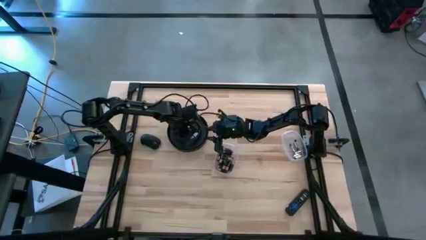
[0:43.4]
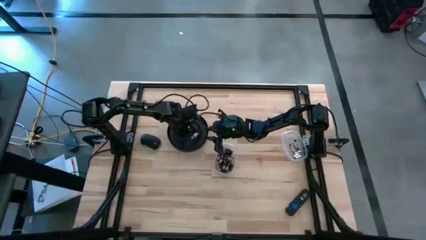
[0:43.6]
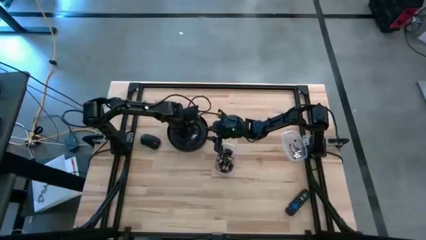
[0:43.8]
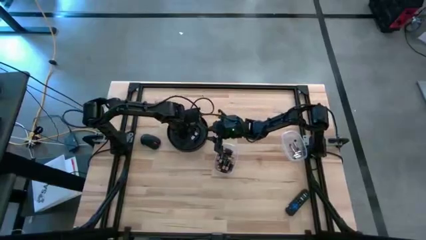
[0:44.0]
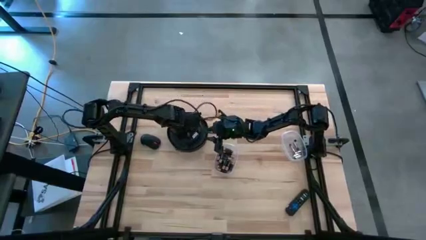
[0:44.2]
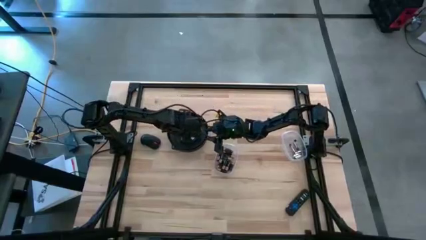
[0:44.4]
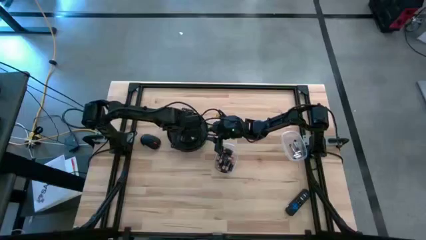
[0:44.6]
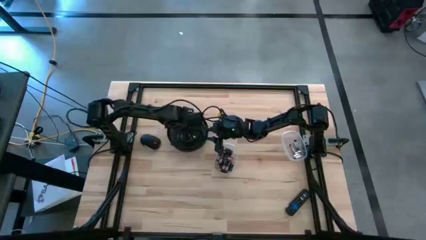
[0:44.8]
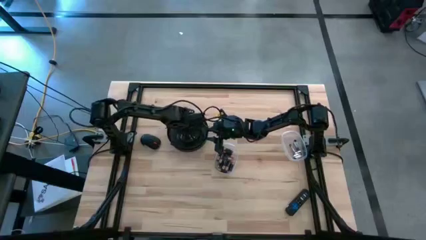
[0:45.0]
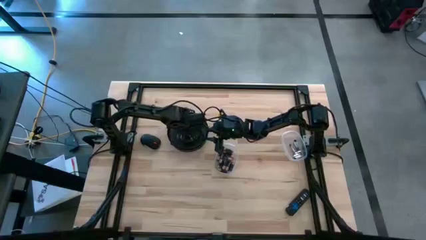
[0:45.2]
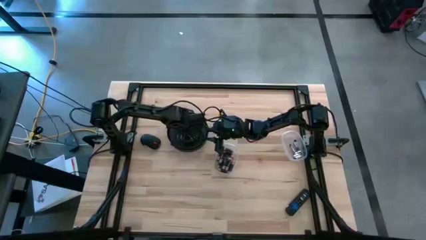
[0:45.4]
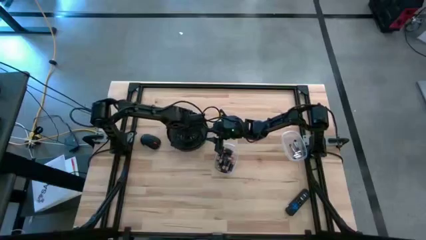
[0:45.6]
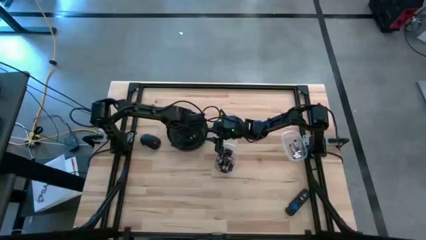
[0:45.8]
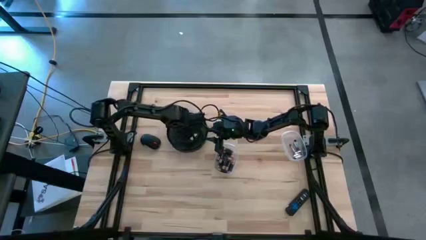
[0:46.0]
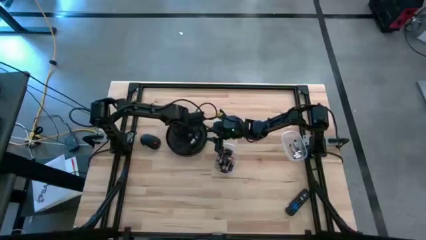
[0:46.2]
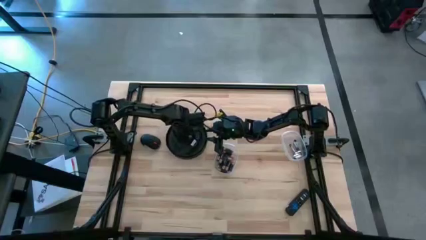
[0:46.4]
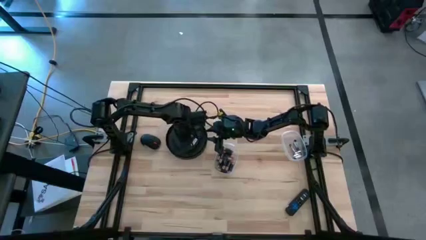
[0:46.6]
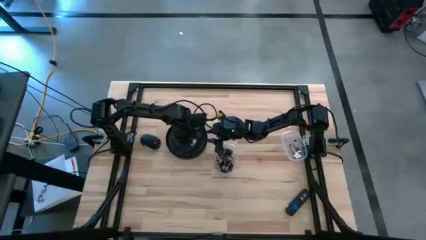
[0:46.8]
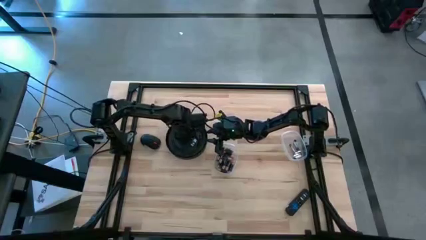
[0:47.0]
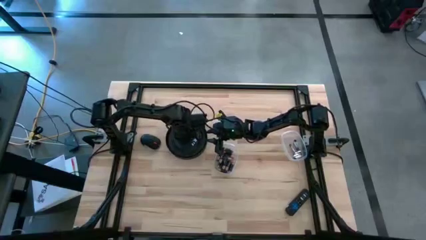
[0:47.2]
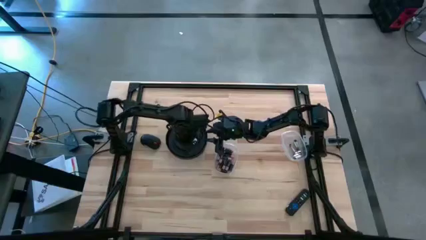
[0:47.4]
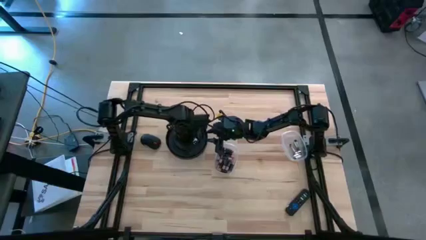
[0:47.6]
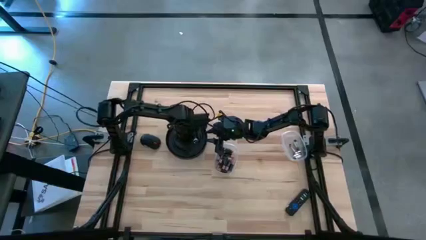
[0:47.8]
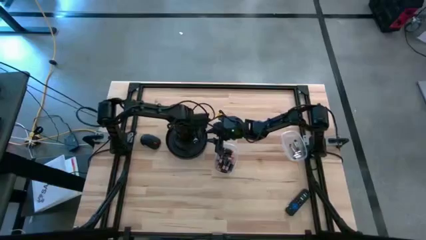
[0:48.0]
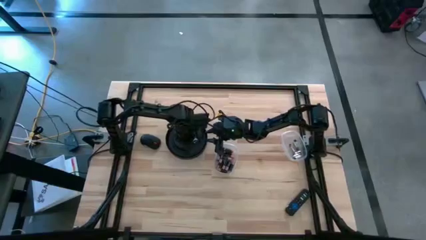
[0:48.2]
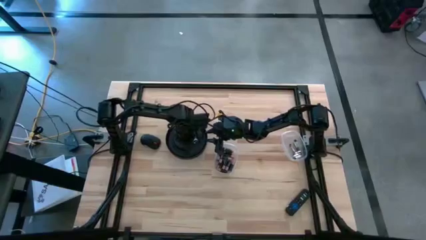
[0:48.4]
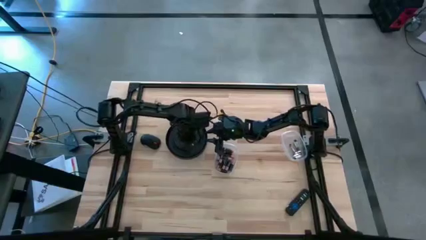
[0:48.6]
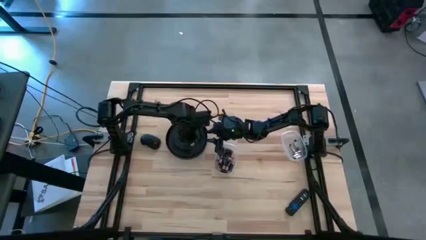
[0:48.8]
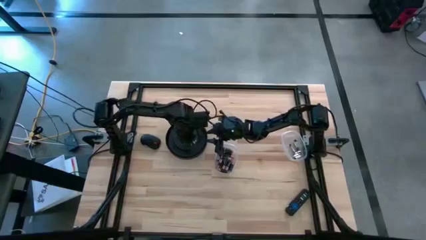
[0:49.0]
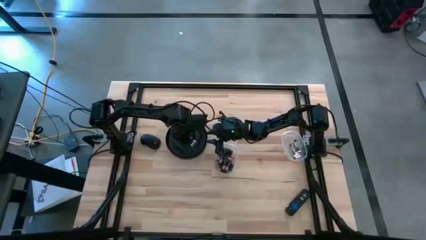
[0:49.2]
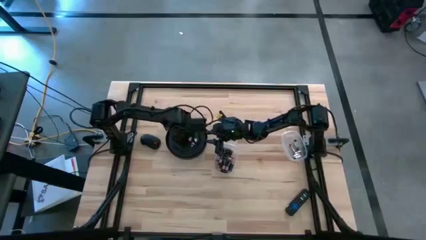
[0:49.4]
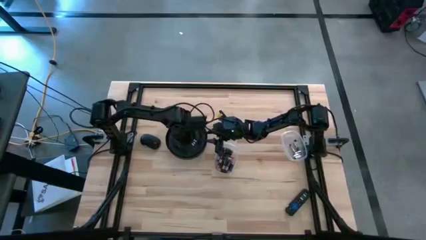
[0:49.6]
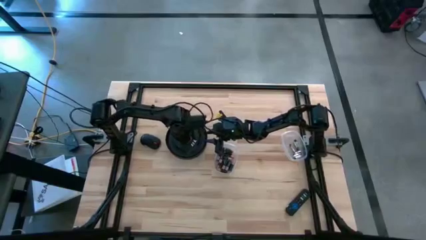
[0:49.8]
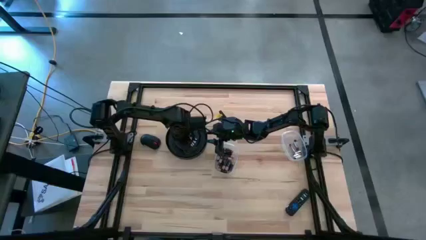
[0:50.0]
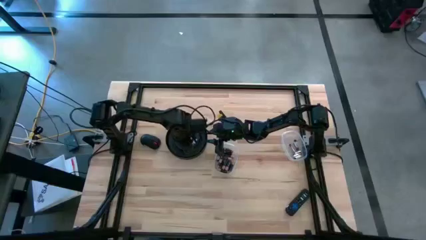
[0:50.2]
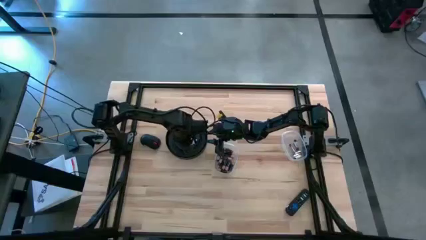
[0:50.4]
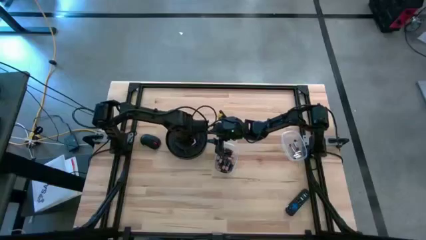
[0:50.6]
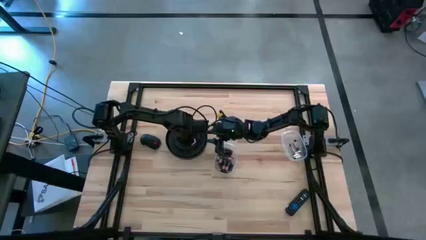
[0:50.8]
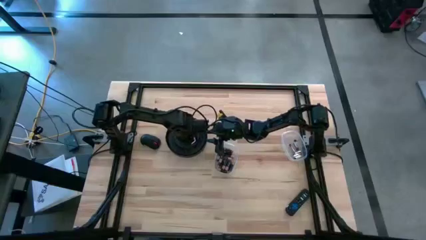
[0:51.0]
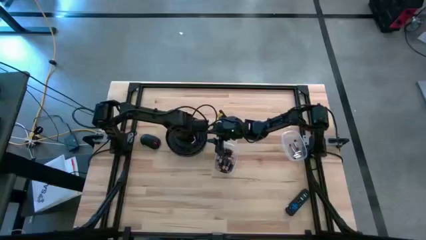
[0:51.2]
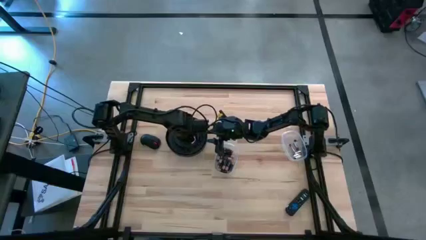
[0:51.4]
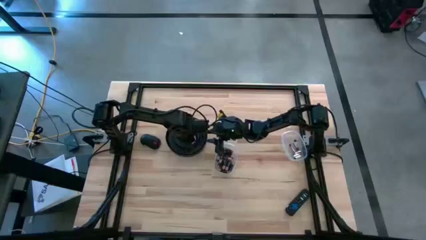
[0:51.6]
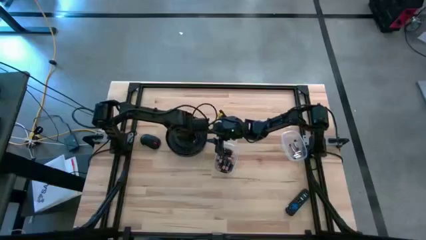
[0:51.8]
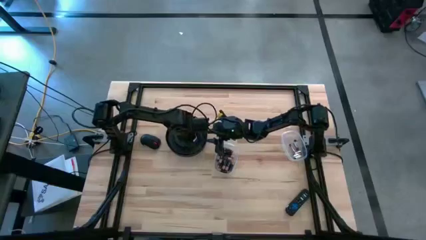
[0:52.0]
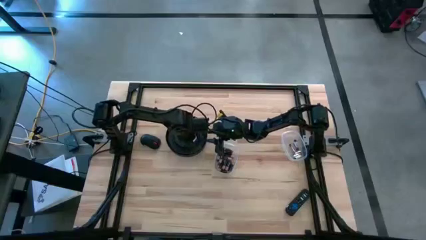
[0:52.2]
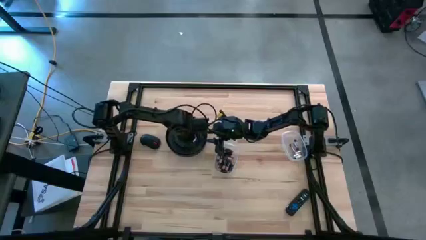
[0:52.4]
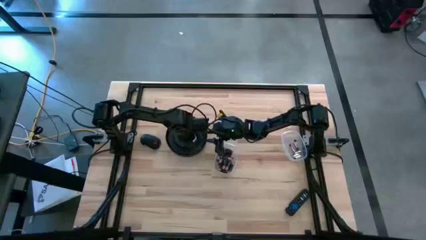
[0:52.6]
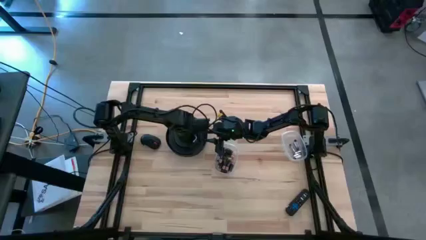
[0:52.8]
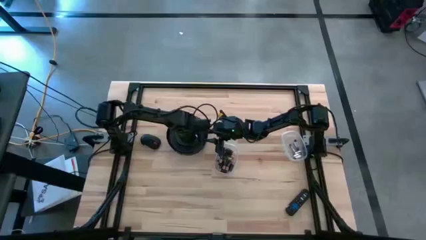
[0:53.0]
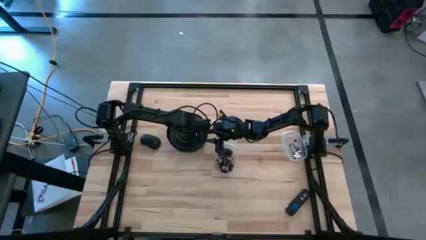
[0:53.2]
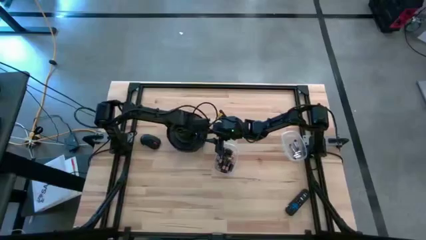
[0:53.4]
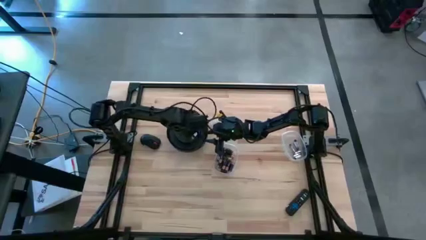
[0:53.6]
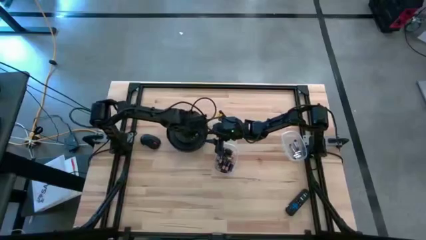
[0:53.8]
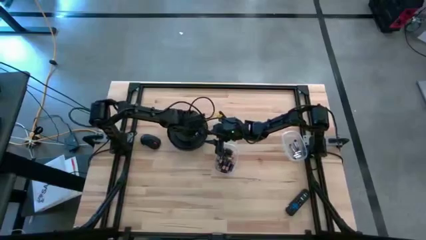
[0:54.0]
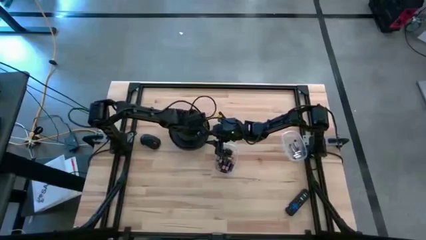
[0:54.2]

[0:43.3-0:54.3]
Task: Insert battery
Insert the orange battery into the wall clock's battery compartment

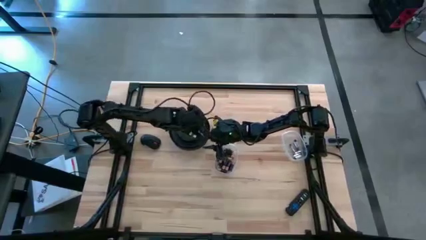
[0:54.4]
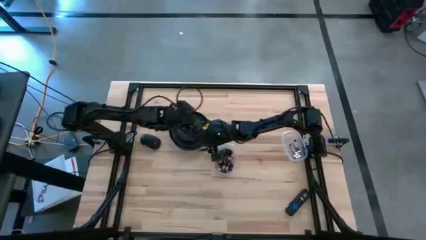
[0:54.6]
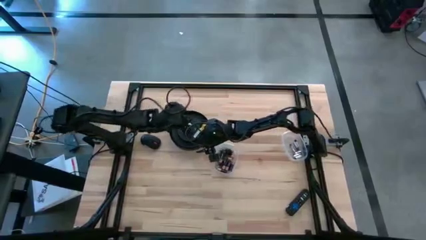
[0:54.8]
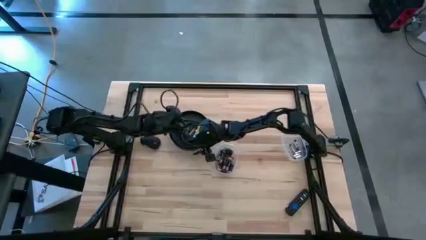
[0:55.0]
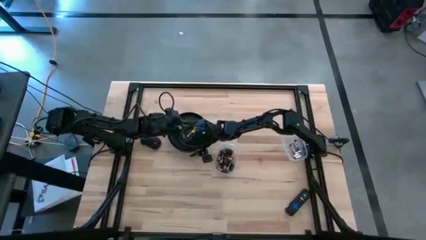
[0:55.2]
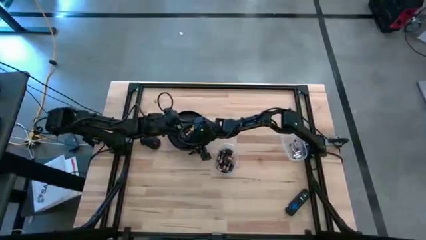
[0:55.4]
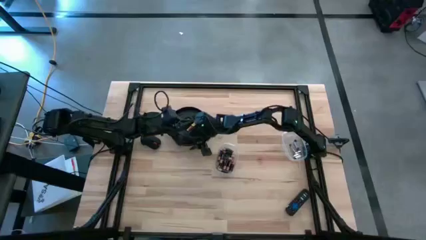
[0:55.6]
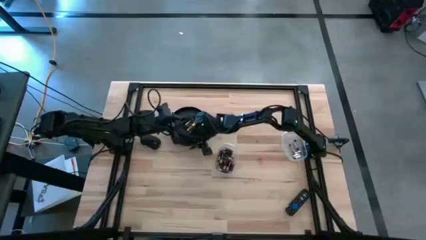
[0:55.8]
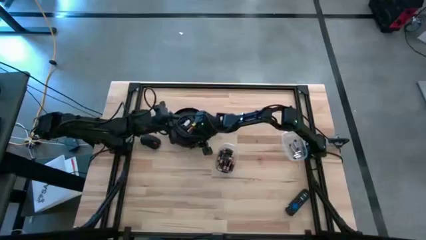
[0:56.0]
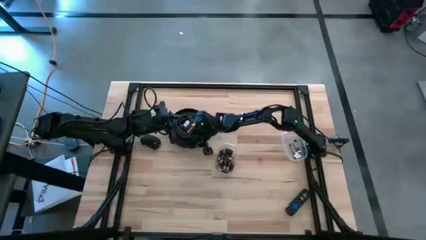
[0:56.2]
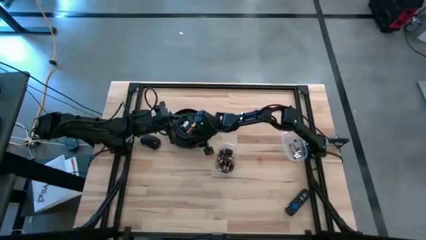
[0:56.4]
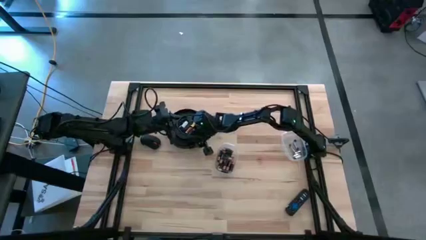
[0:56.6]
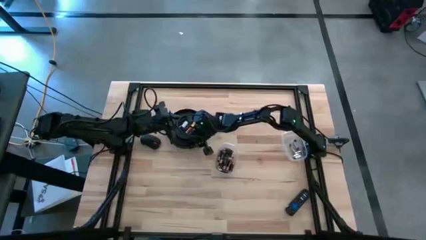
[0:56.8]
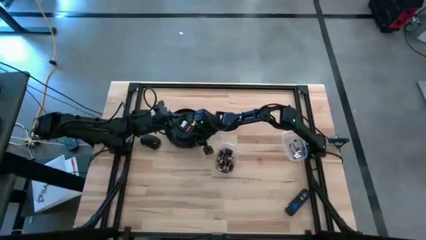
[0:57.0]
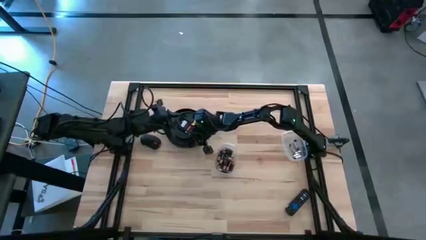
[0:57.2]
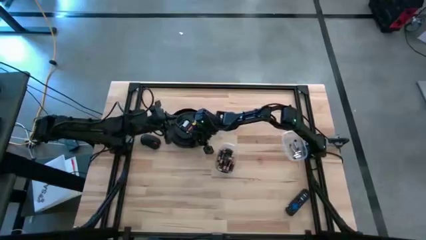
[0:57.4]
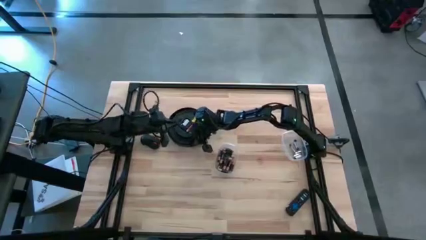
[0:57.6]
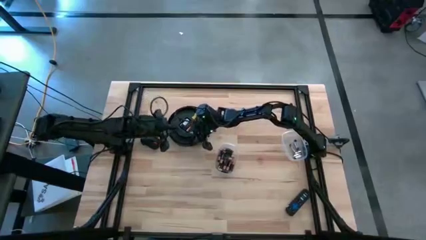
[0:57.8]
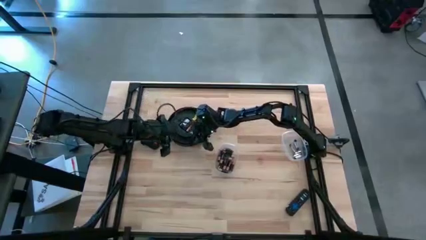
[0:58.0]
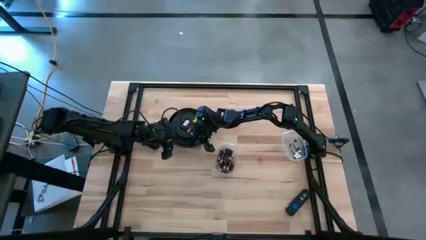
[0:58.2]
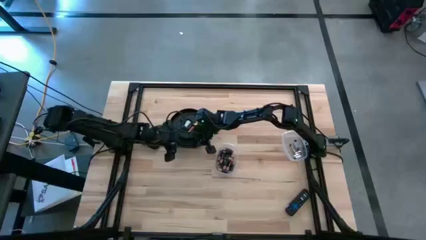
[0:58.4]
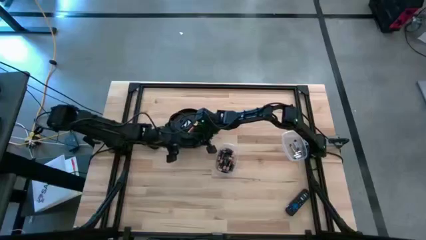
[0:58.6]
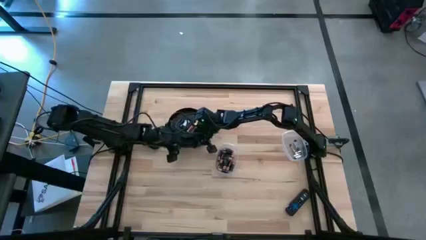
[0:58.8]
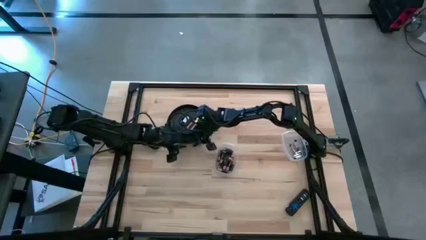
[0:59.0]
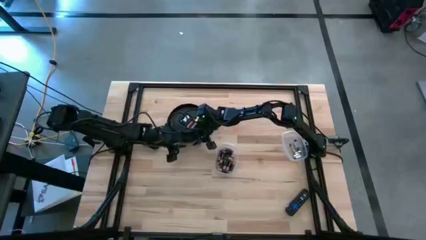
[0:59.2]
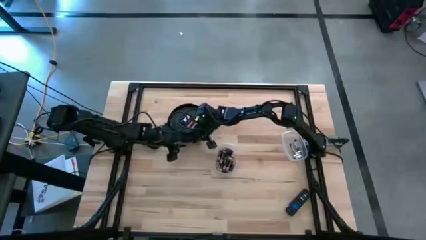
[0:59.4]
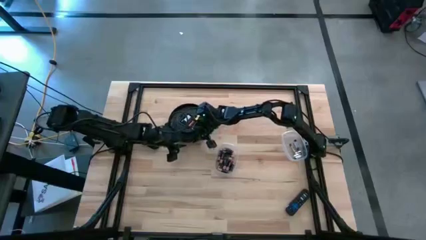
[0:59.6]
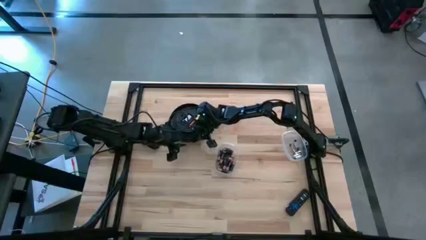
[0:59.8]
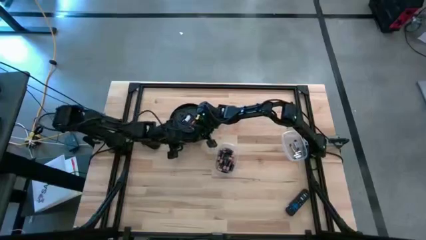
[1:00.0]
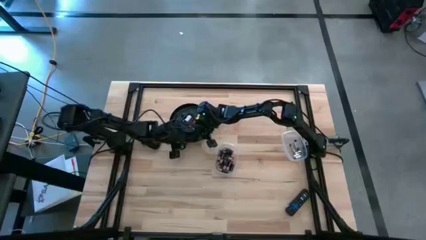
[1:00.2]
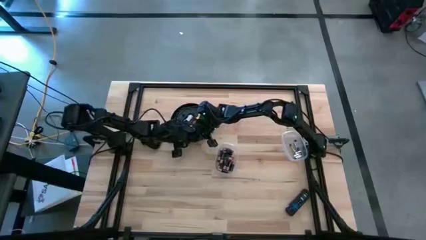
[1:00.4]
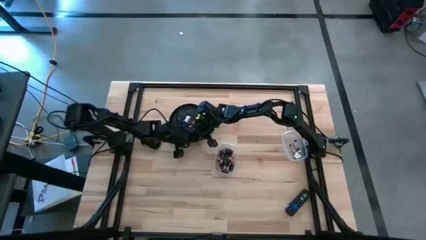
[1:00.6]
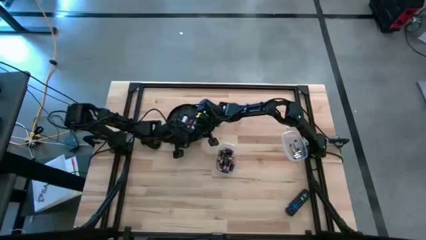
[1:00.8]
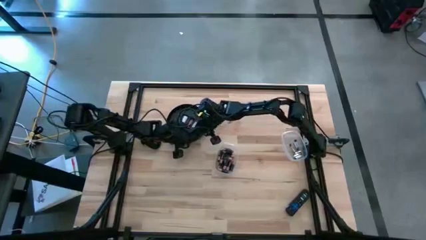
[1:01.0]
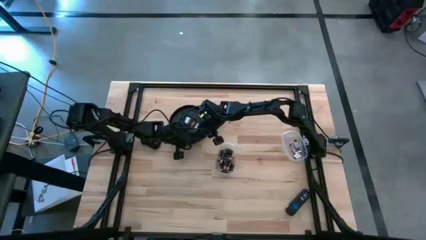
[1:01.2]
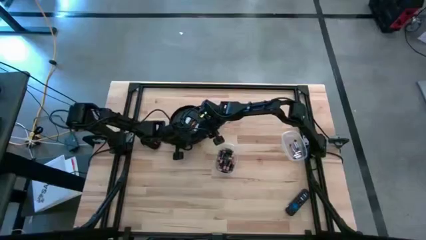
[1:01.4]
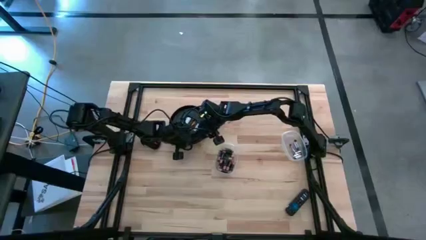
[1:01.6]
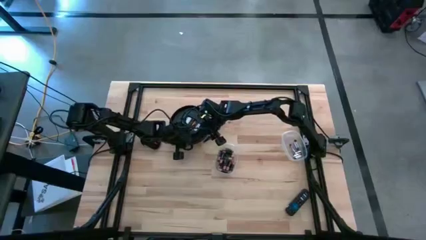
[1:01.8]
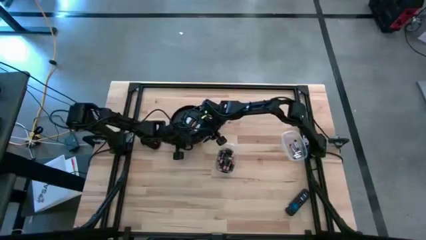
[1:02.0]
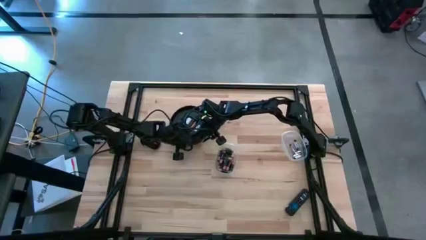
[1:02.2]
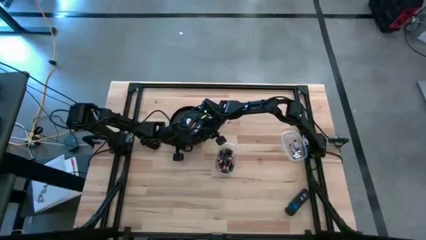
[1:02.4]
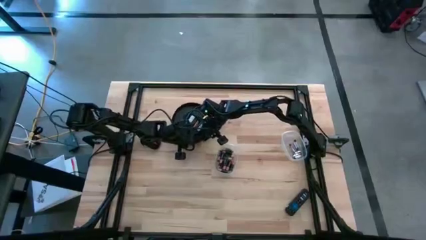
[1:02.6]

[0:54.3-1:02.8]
Move the wall clock
